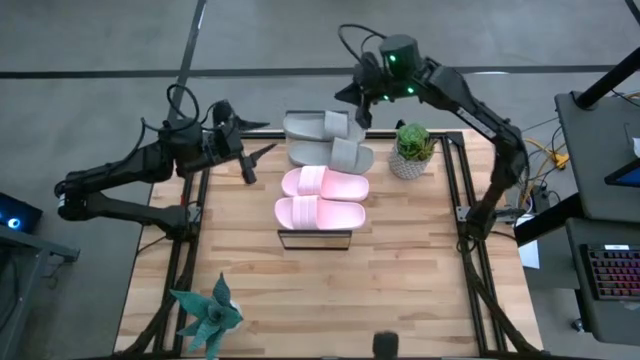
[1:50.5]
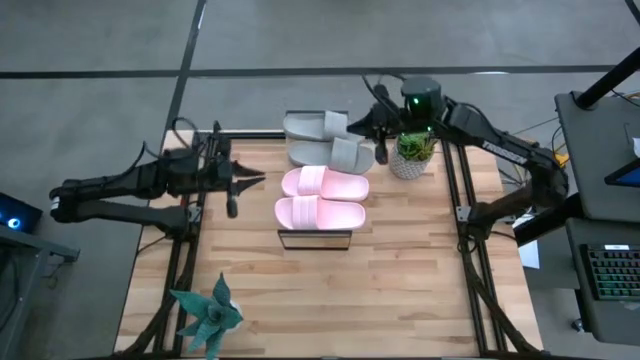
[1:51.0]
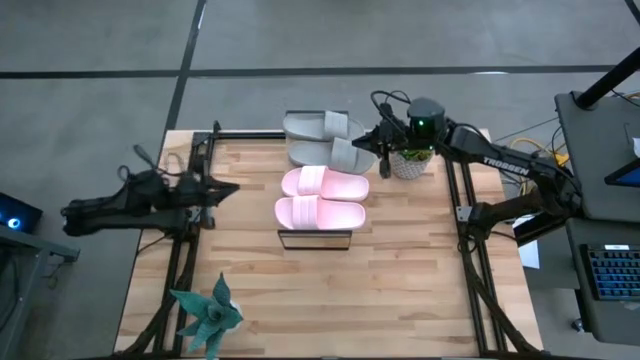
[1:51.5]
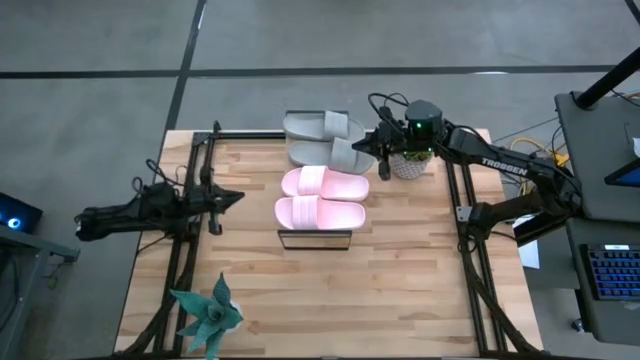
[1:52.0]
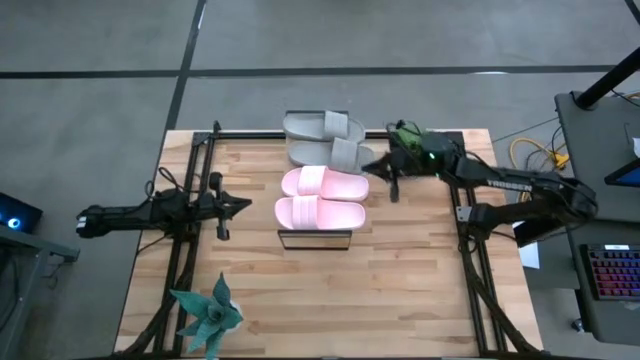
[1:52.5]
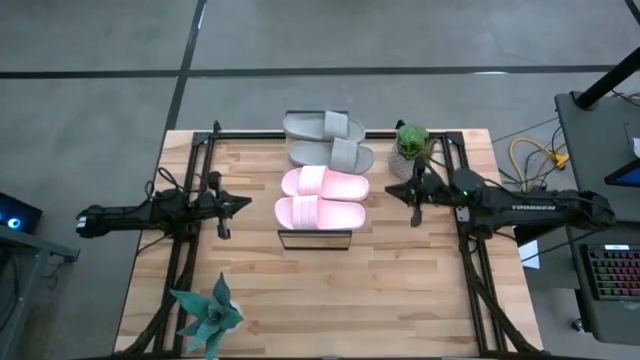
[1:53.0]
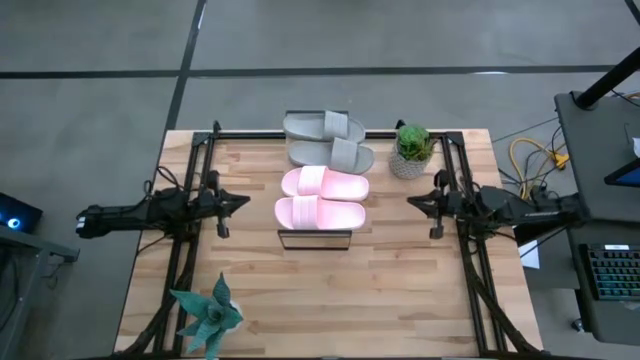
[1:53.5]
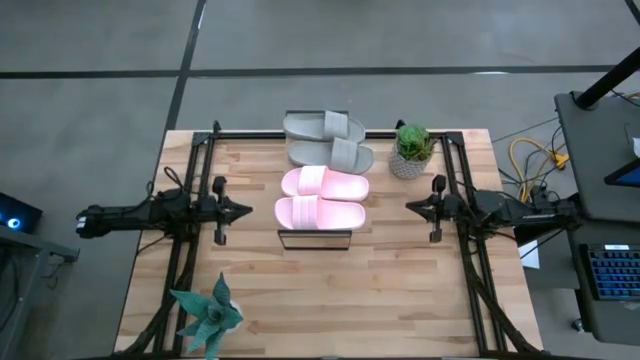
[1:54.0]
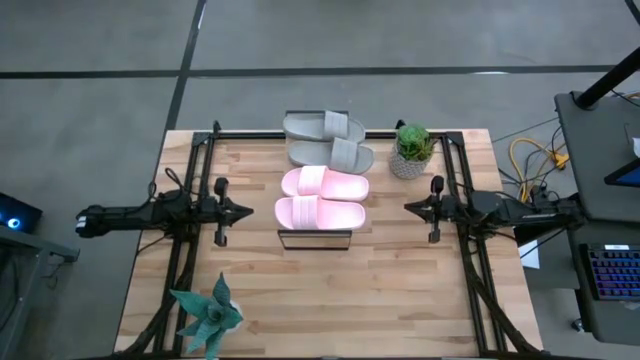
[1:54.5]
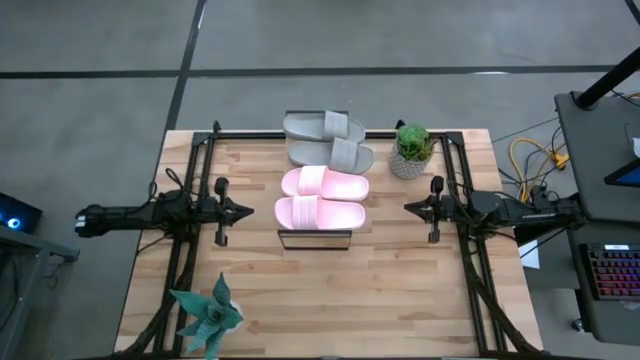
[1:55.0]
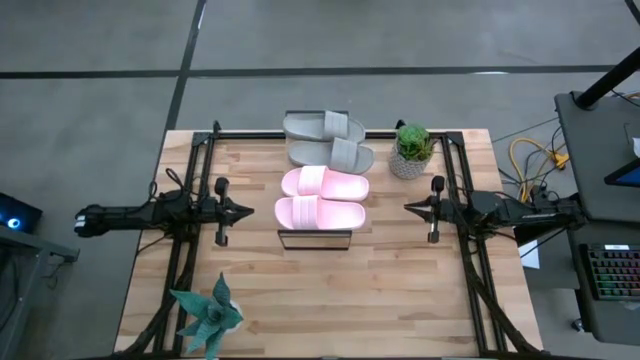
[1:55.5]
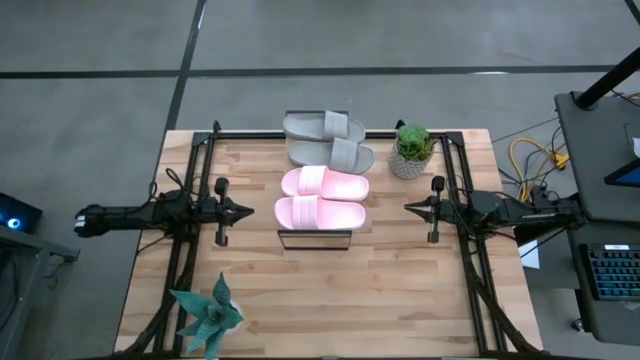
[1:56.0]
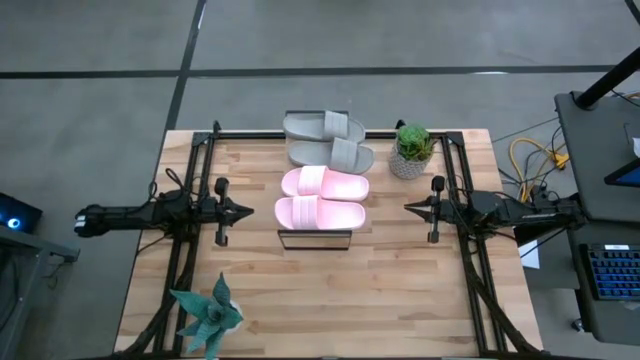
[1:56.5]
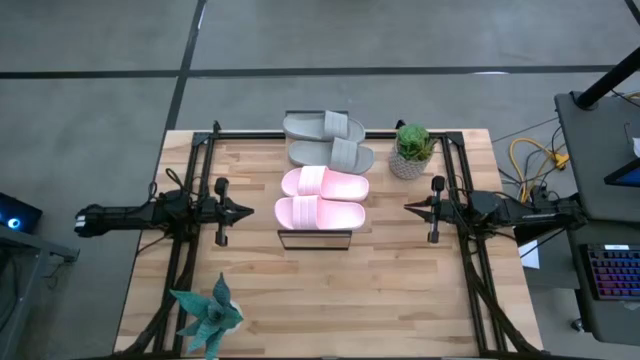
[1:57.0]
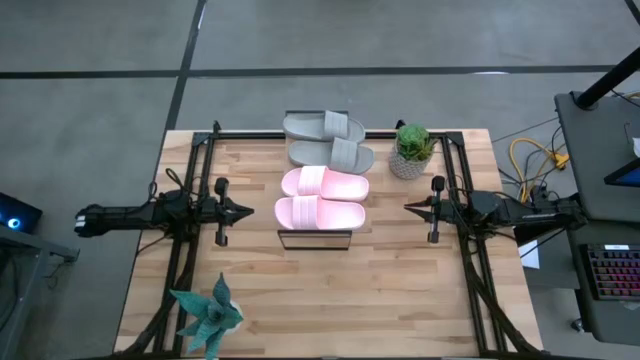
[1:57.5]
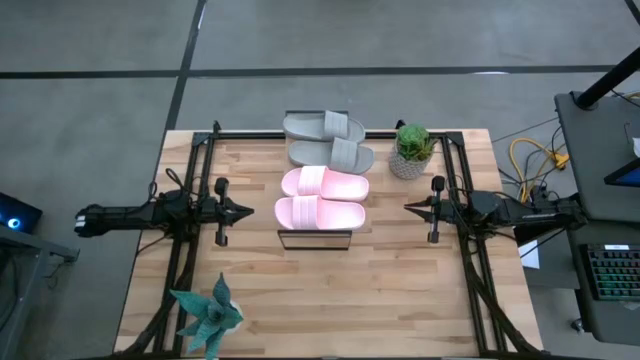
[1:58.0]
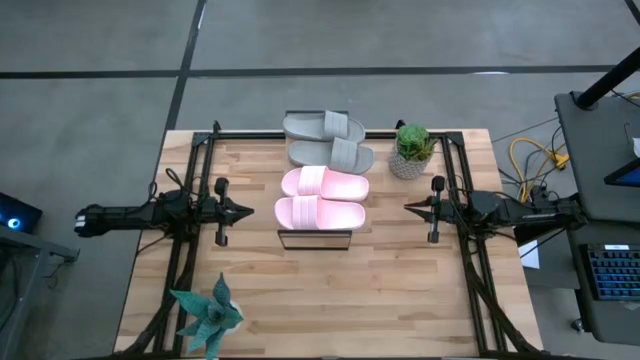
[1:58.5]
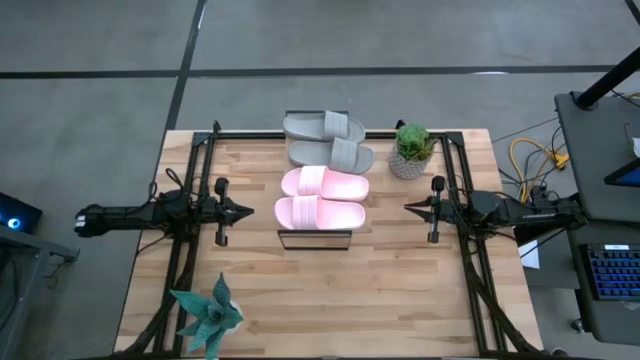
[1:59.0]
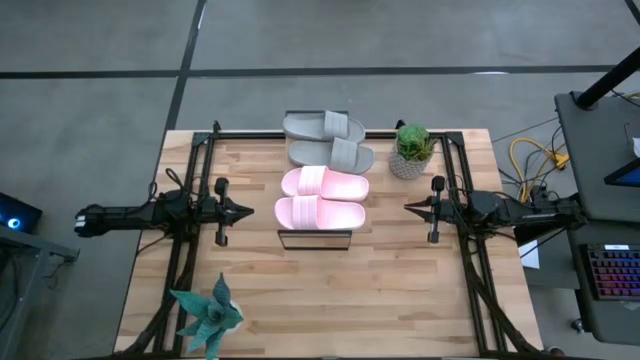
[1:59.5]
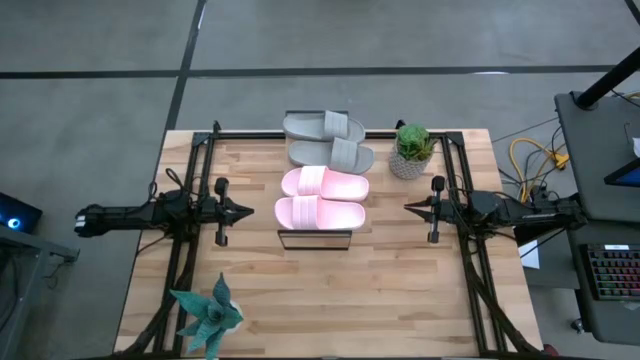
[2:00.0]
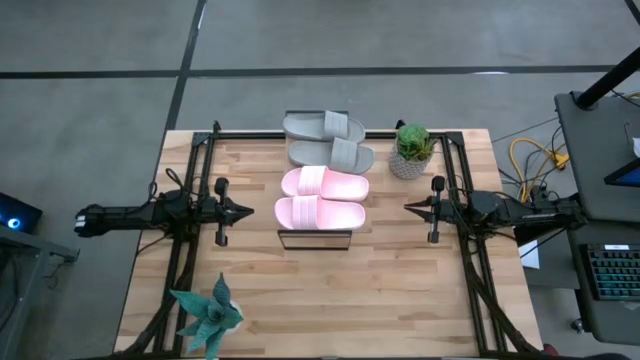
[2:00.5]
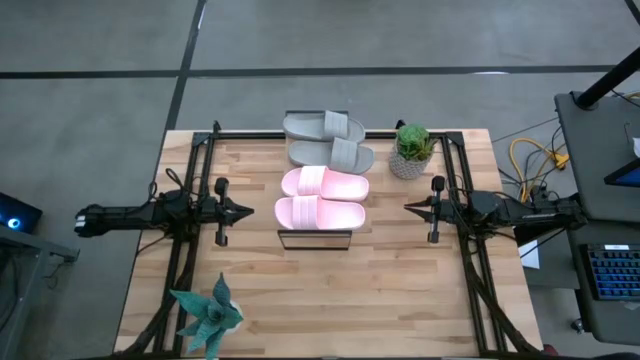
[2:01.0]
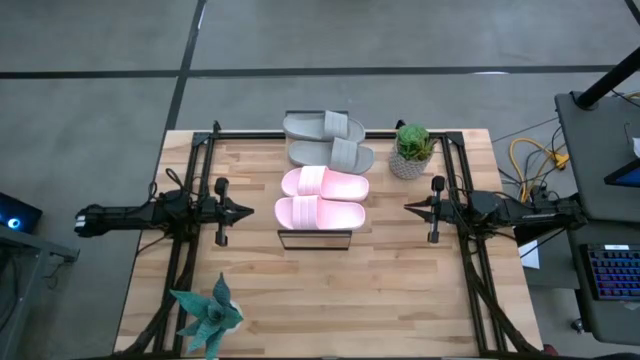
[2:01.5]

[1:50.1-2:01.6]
Task: Pick and place slides into the shelf
Return to Home Position
